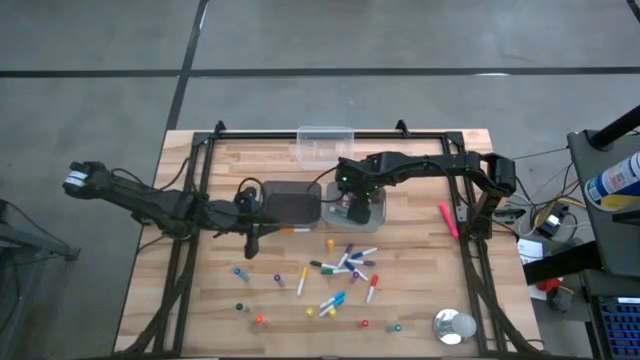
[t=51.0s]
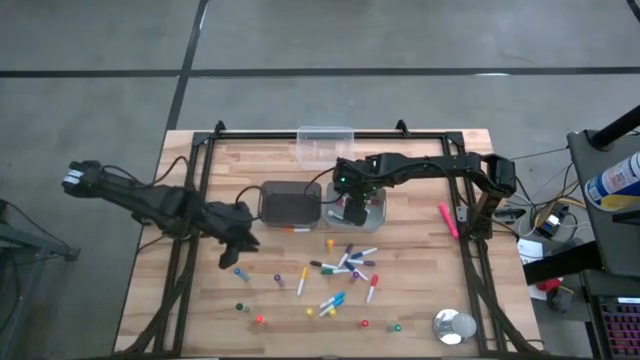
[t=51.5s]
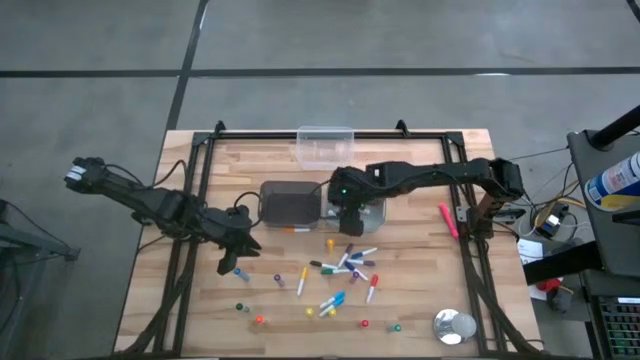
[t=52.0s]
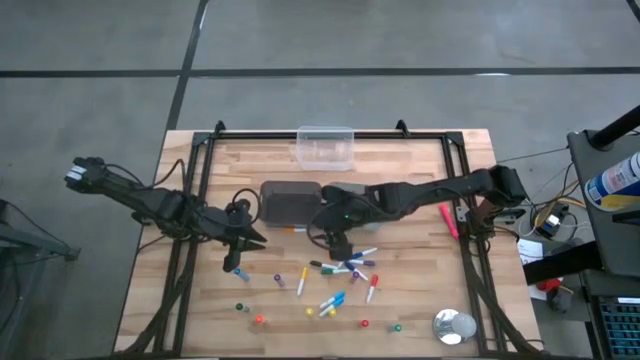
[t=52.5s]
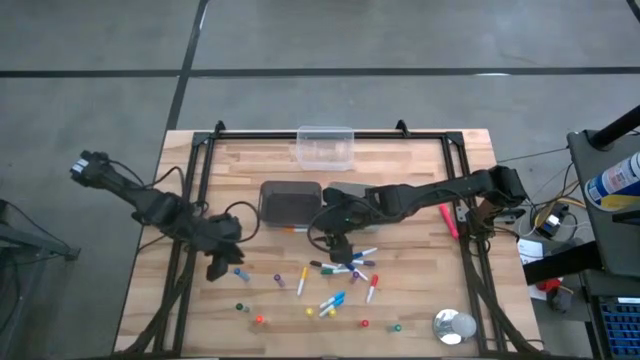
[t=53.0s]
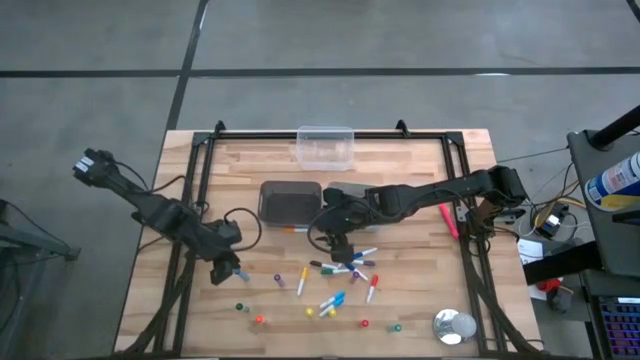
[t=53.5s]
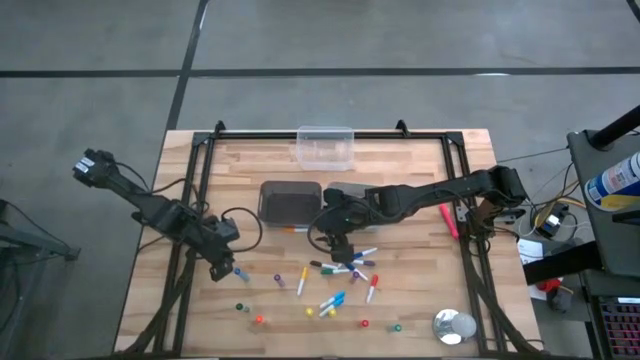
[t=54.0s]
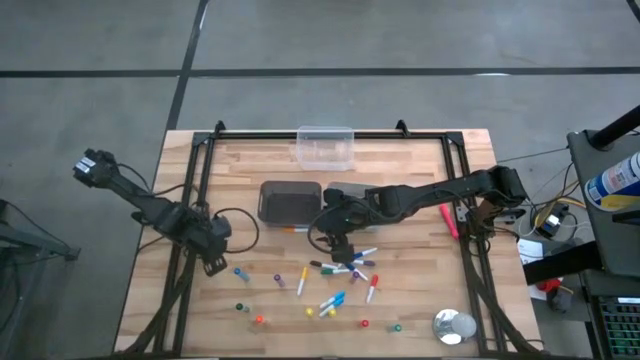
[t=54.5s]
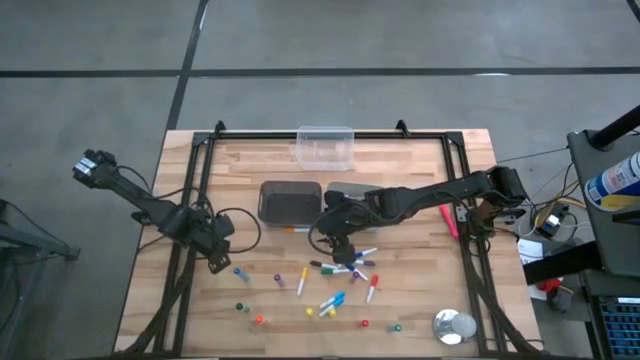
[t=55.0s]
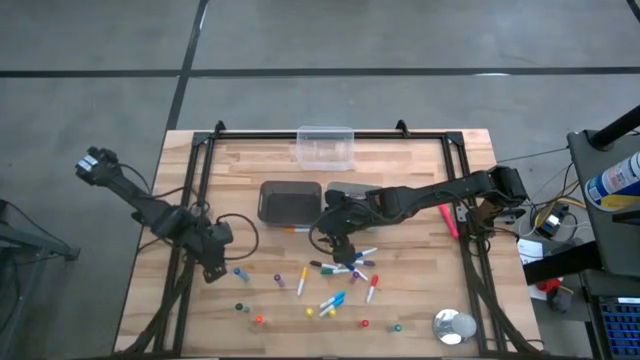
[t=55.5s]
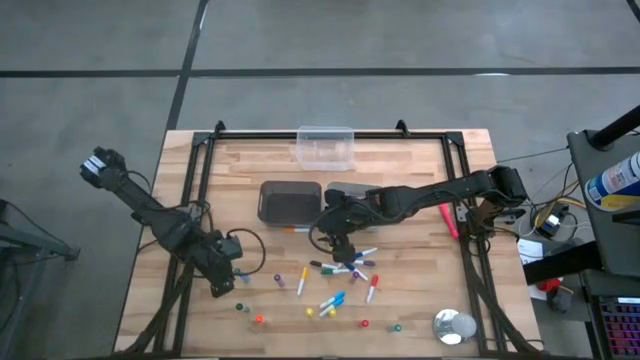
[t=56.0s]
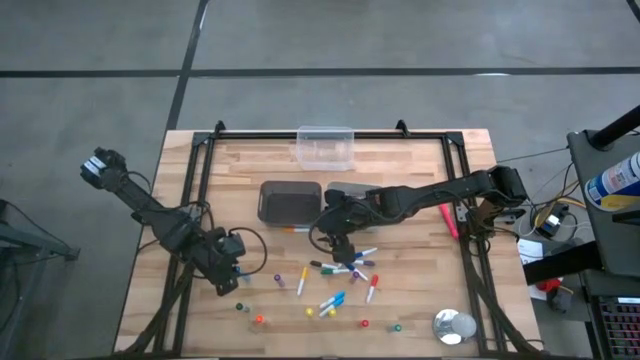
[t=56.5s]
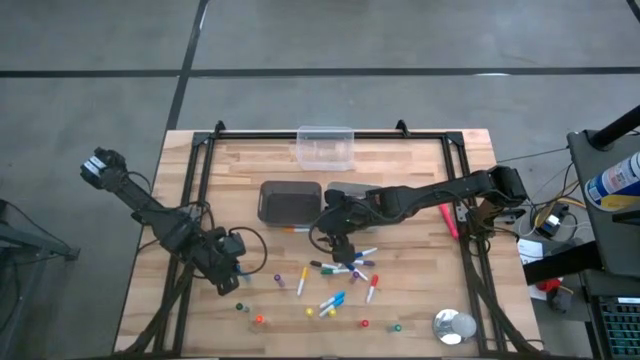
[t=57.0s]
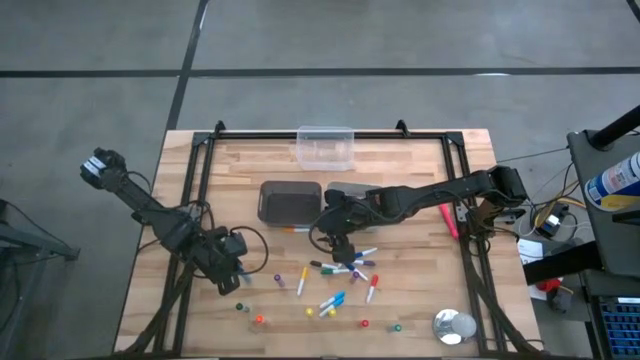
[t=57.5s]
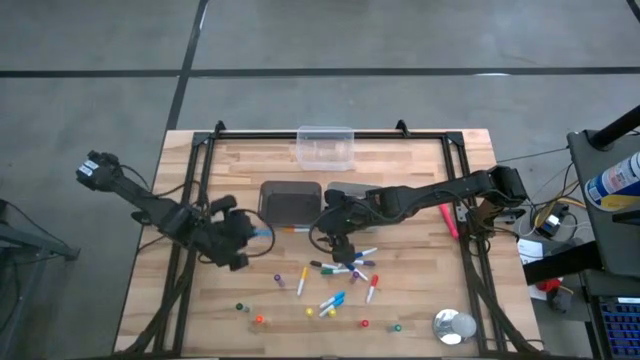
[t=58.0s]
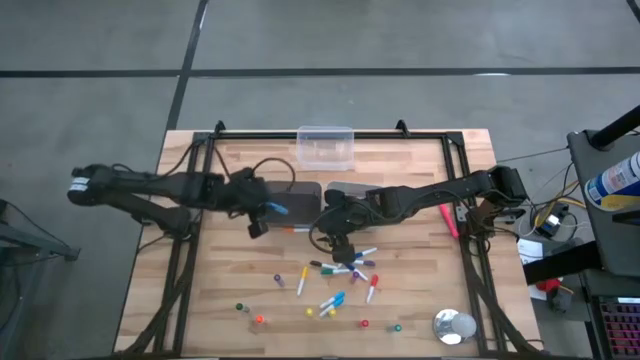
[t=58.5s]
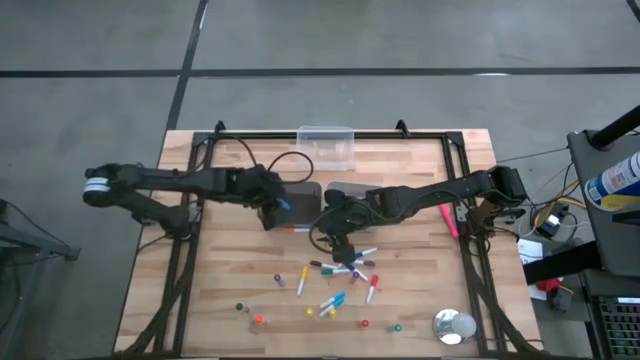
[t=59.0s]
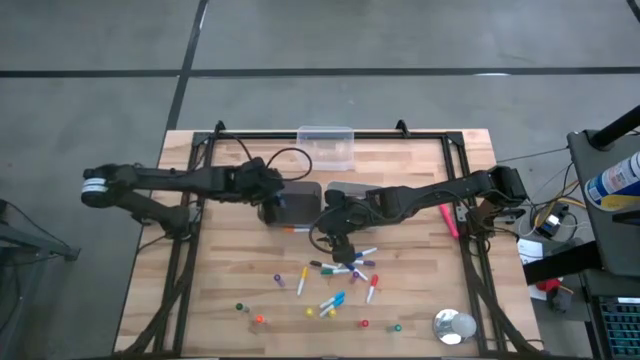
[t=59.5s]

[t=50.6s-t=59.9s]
Task: Pick & Place Markers
Put the large blue highlighter pen into the black bin

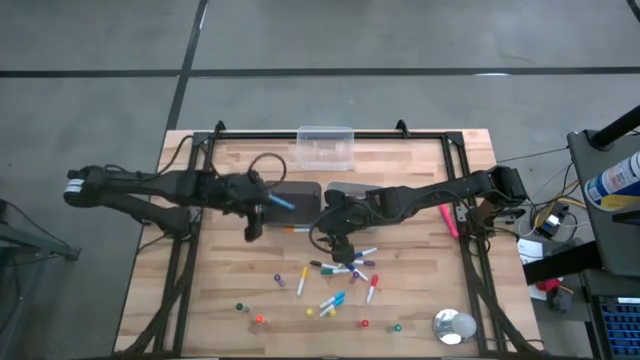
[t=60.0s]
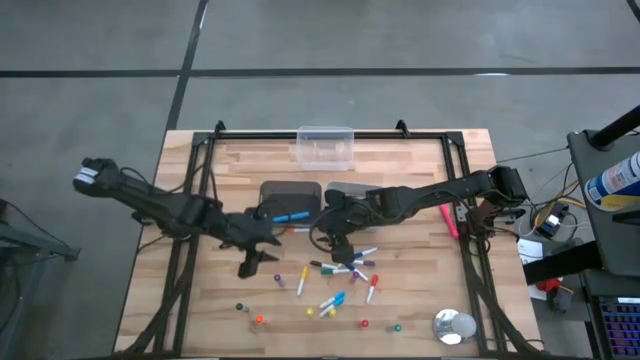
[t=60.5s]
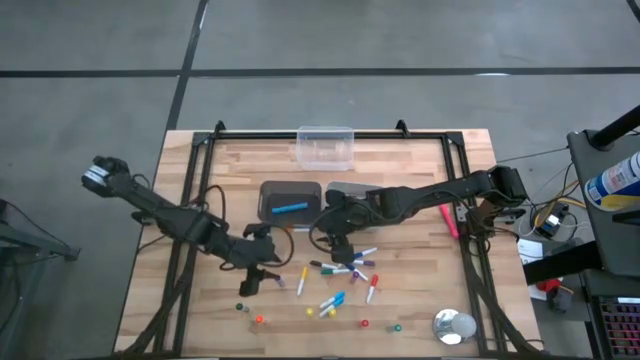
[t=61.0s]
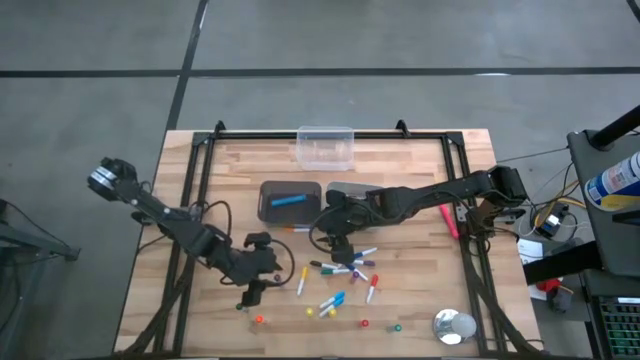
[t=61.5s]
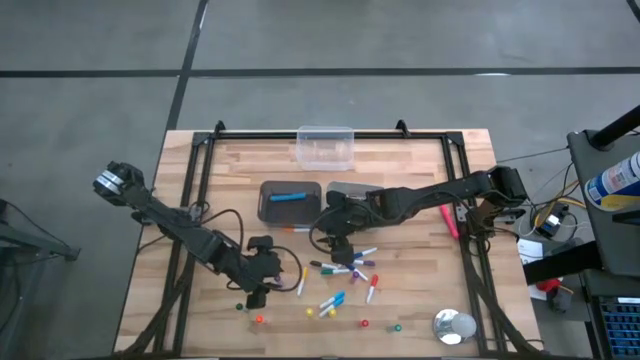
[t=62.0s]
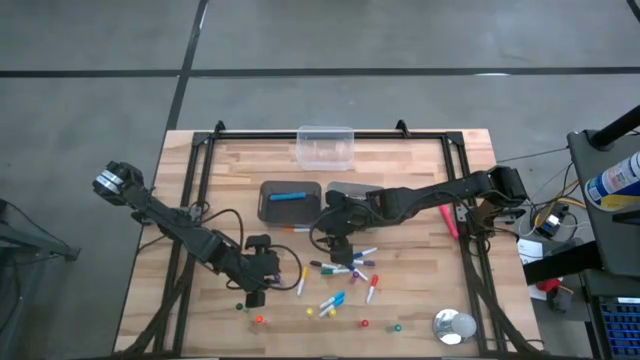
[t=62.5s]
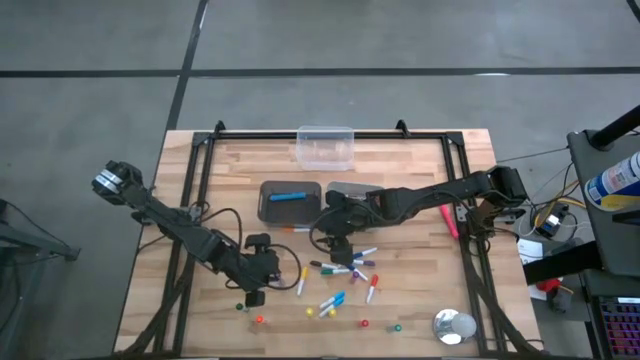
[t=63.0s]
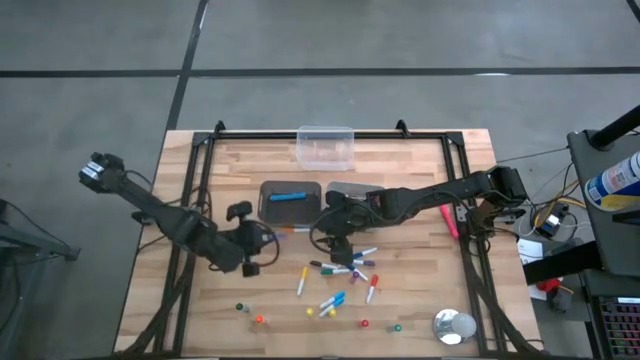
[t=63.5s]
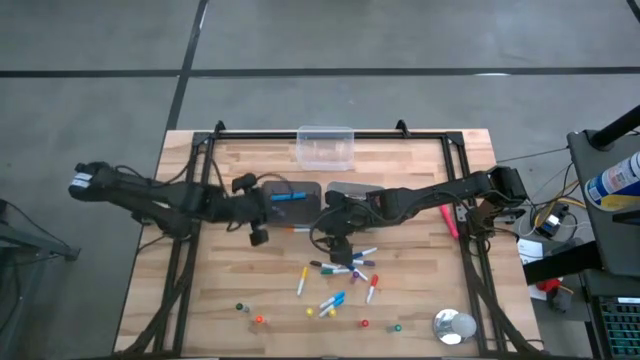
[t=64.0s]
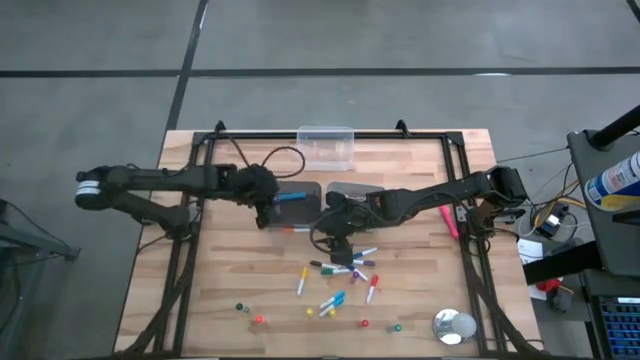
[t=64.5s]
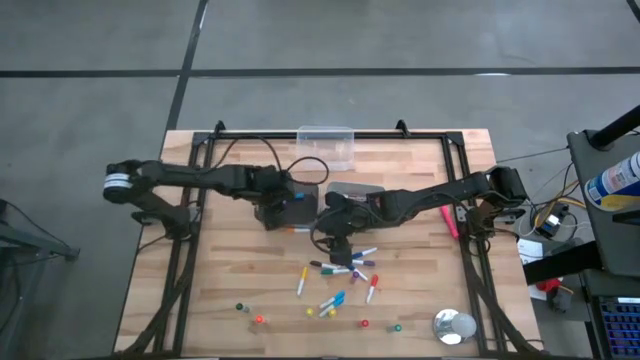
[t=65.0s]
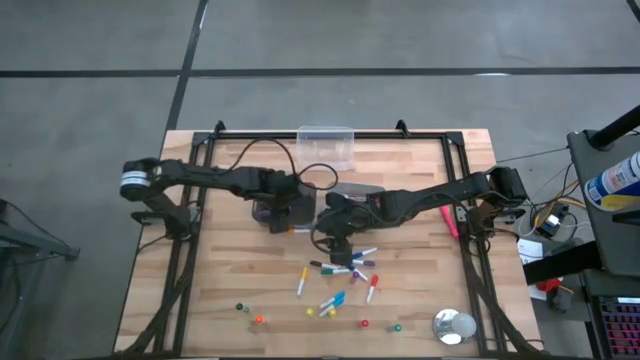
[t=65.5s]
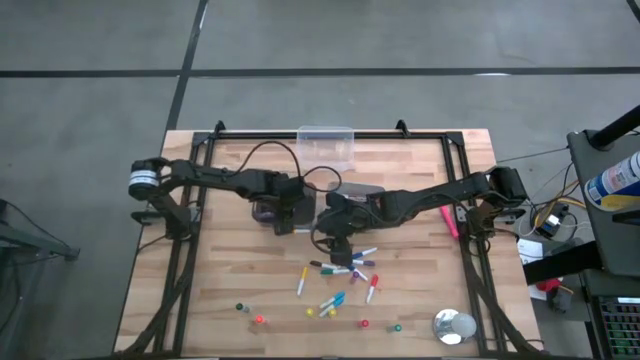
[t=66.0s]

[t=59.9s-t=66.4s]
Put the large purple highlighter pen into the black bin
